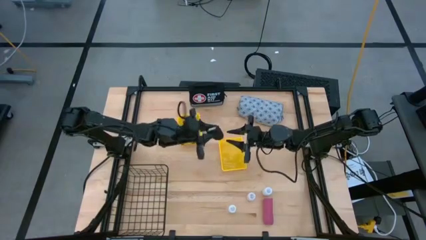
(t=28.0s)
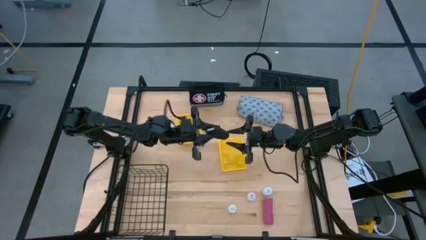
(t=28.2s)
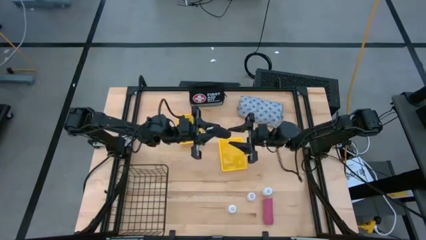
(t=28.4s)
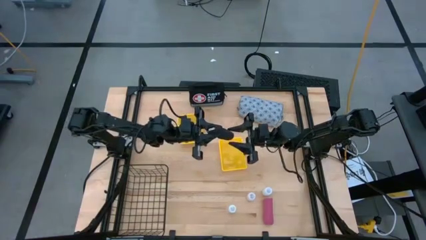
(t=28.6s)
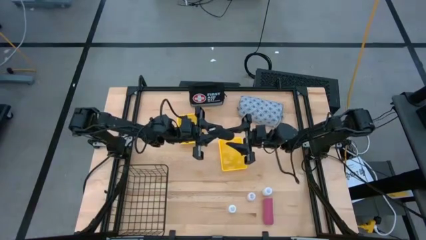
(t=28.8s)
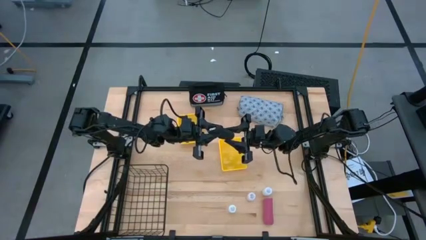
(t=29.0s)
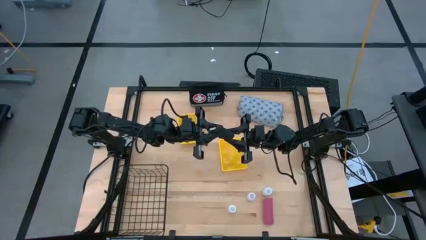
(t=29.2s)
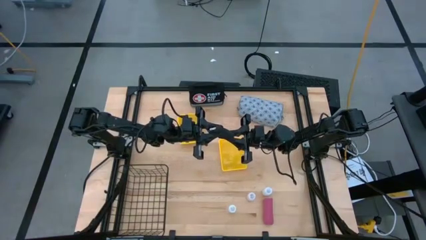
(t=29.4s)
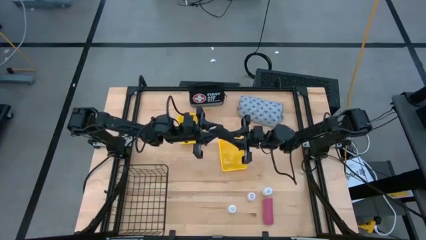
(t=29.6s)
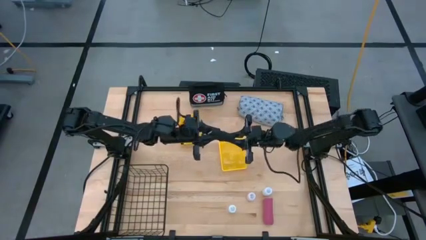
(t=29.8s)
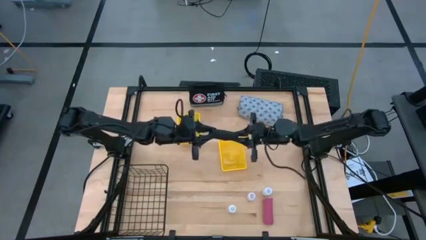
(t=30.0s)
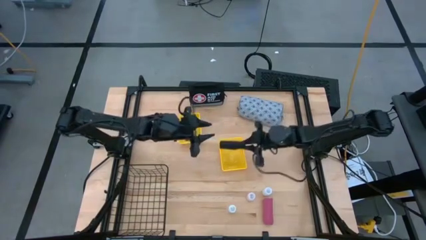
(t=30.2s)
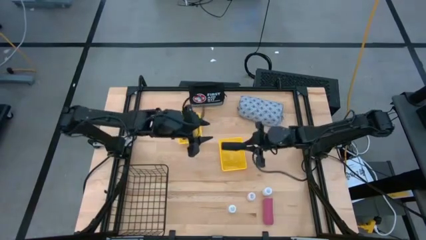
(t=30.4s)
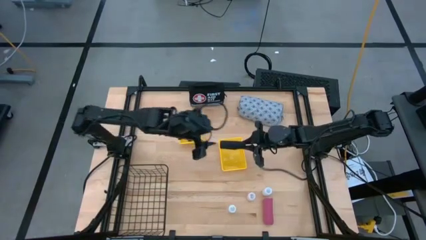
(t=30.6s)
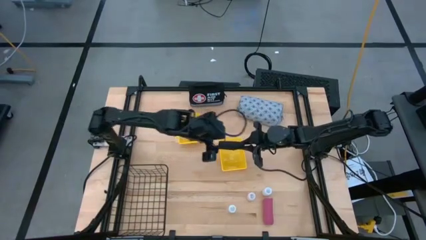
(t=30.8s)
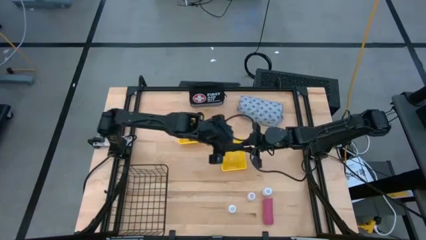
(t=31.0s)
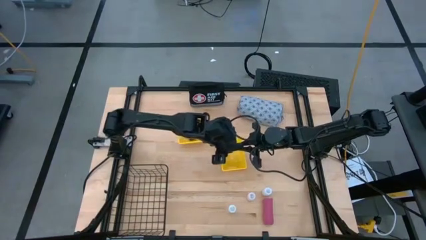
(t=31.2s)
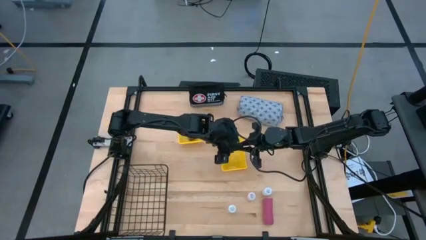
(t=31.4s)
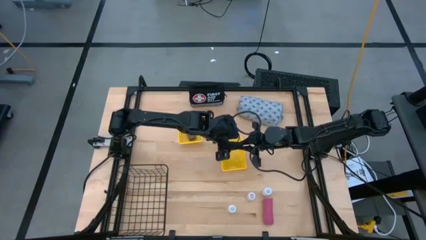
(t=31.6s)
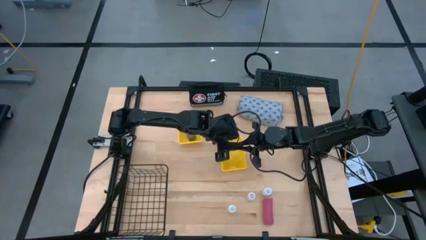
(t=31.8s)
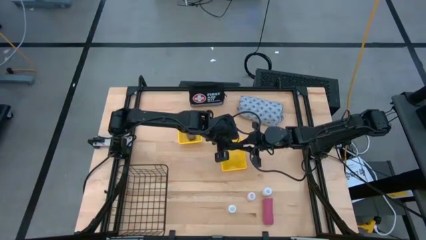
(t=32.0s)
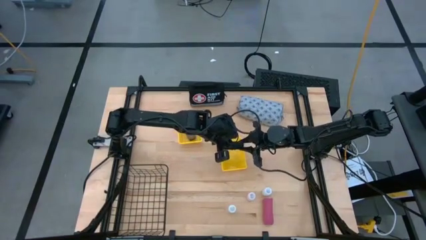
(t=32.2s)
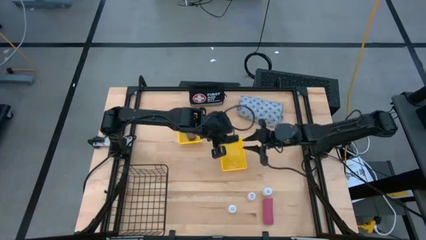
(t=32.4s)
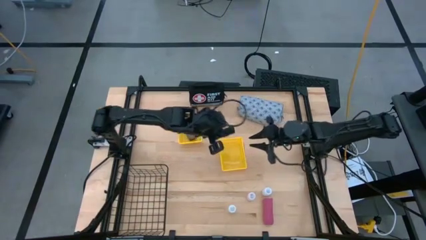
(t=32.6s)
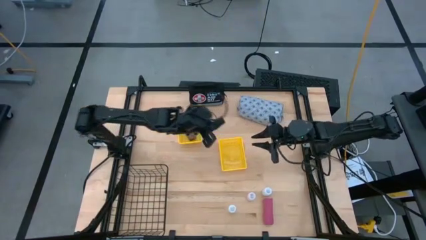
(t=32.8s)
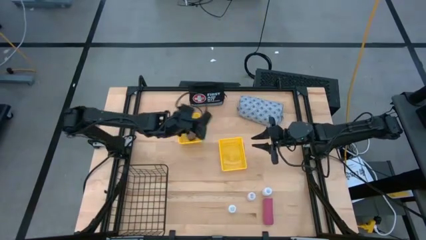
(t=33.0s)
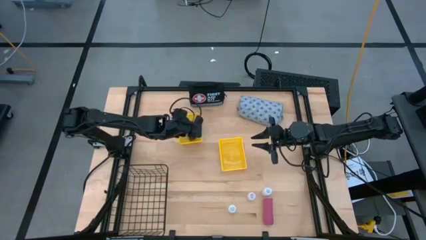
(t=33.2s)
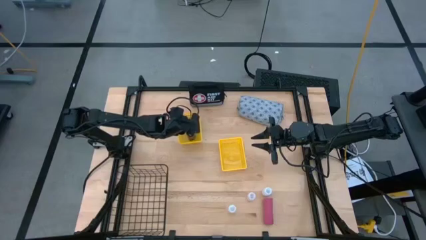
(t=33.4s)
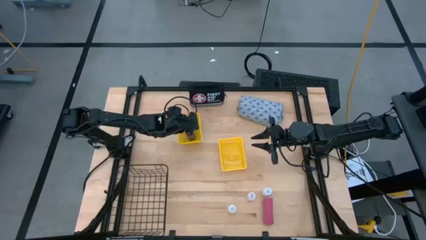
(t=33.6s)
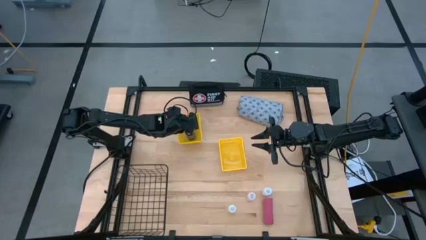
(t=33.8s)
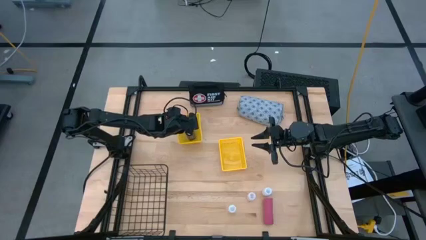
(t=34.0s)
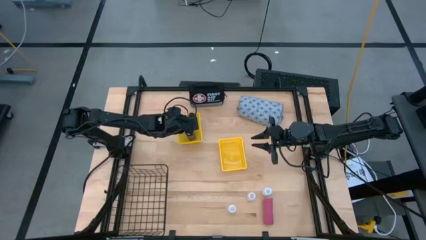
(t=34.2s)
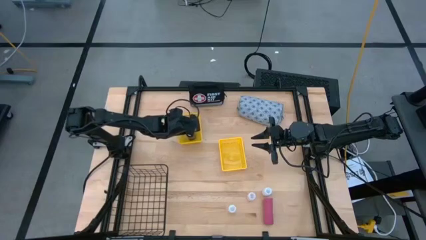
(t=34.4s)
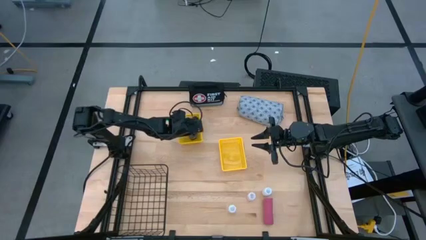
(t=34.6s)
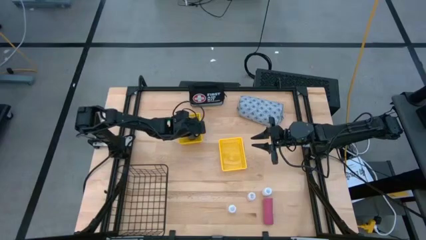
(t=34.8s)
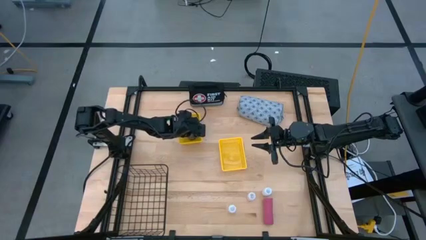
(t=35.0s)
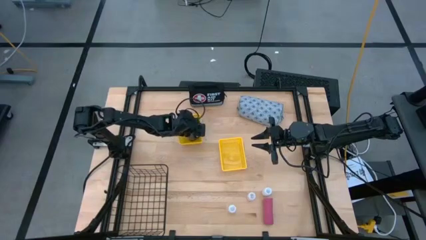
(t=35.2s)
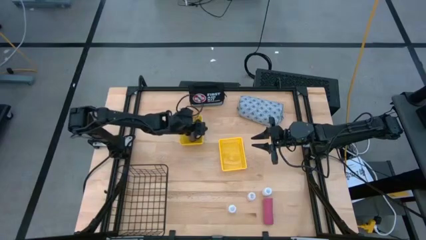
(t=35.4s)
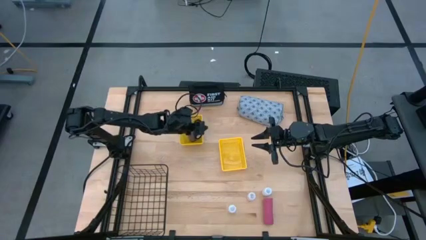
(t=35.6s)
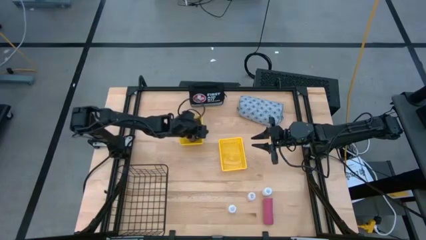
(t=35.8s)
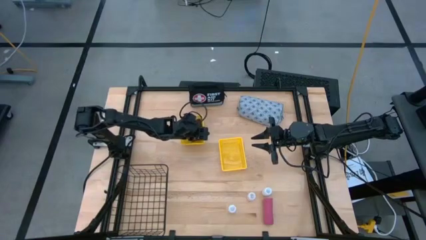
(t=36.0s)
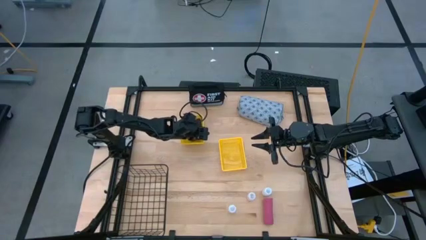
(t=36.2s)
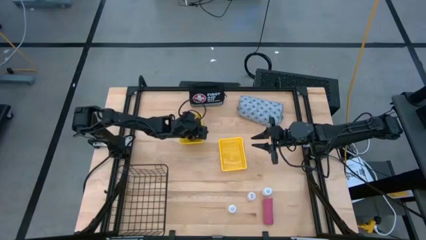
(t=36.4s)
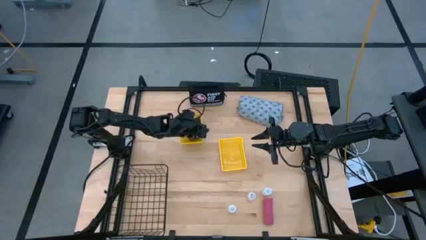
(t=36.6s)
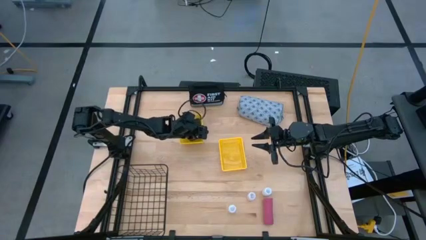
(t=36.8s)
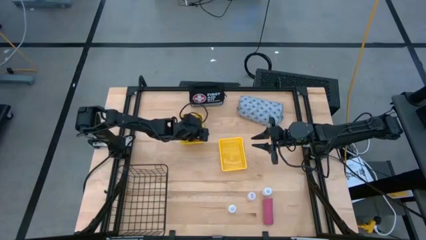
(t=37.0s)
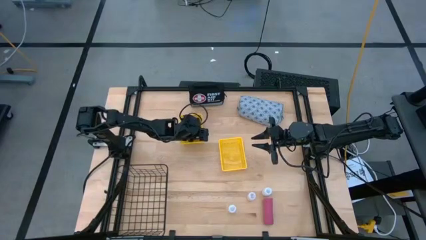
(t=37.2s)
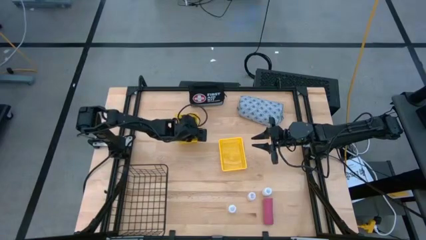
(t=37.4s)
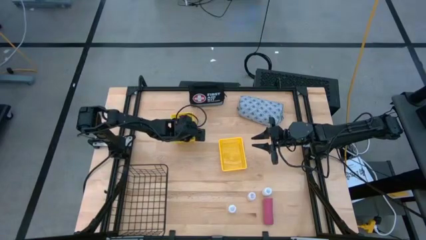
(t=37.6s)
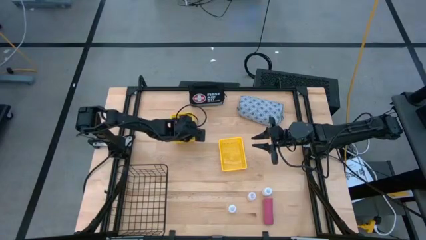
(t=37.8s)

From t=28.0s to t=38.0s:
Task: Pick & Place Medicine items
Put the black bandage into the left yellow basket
